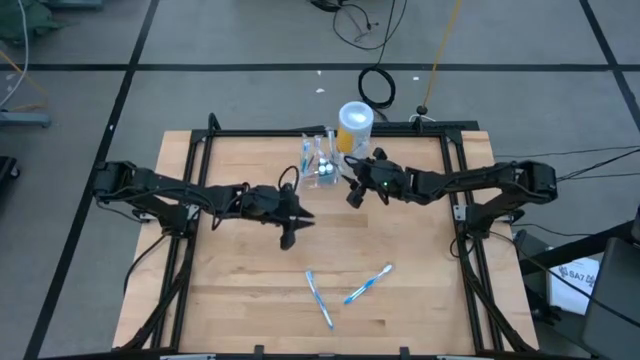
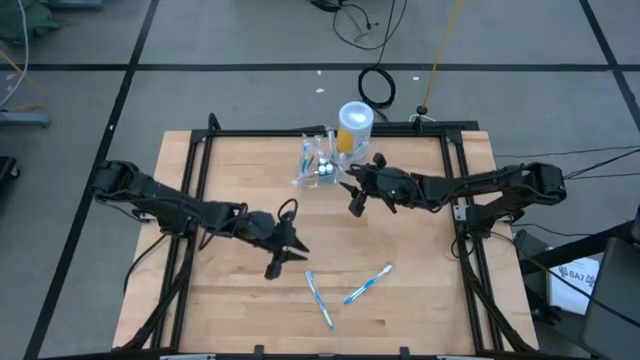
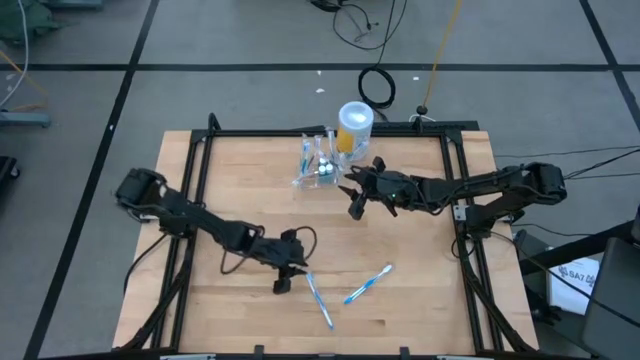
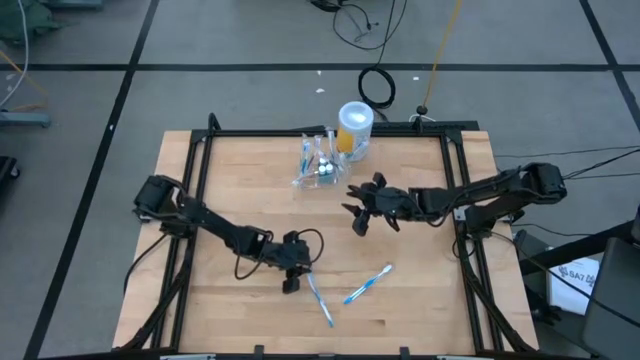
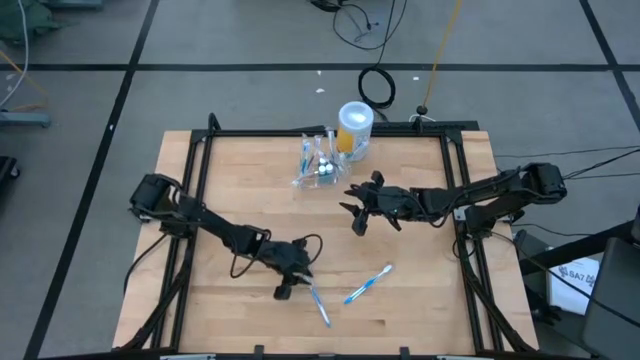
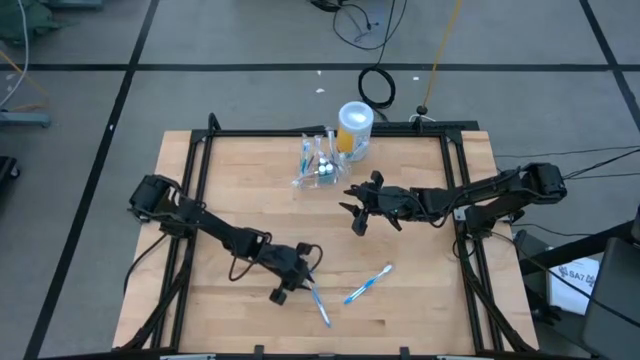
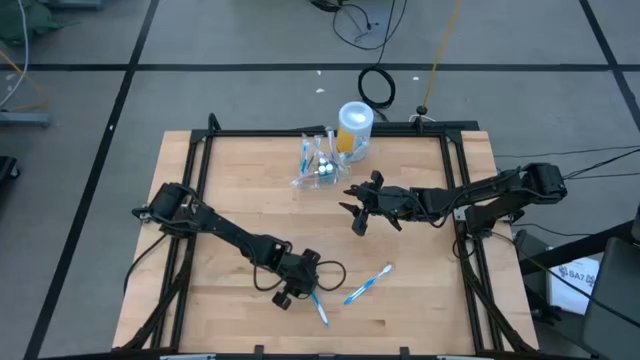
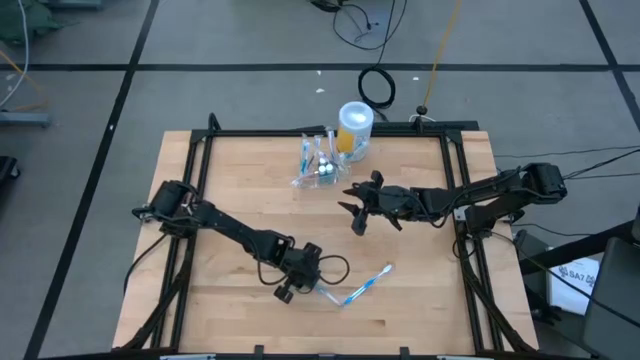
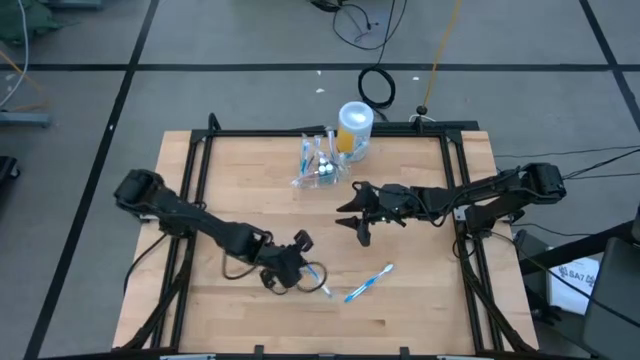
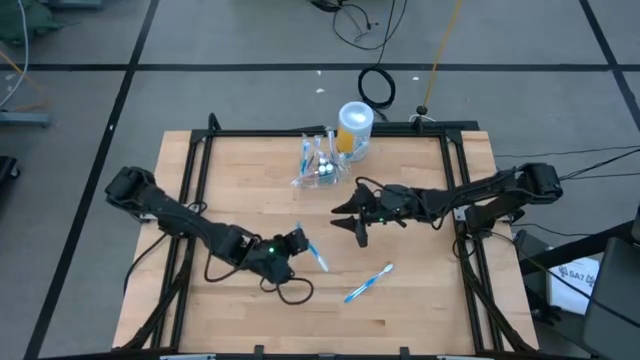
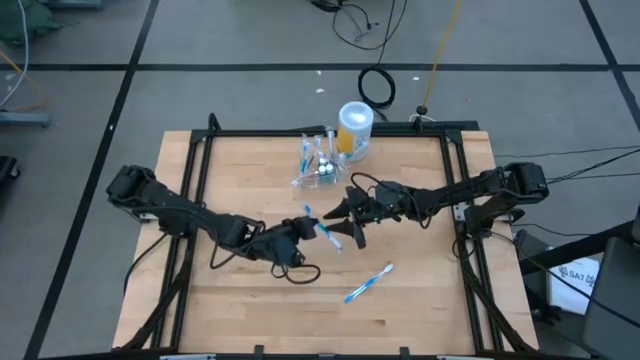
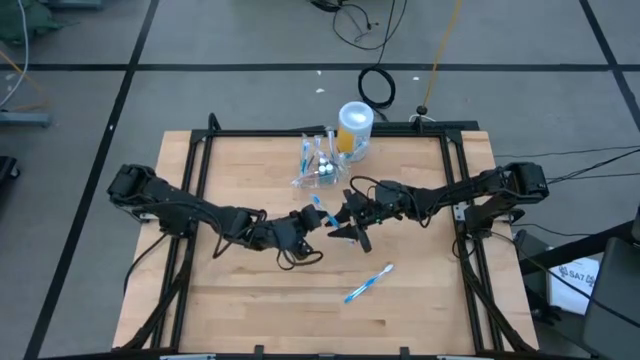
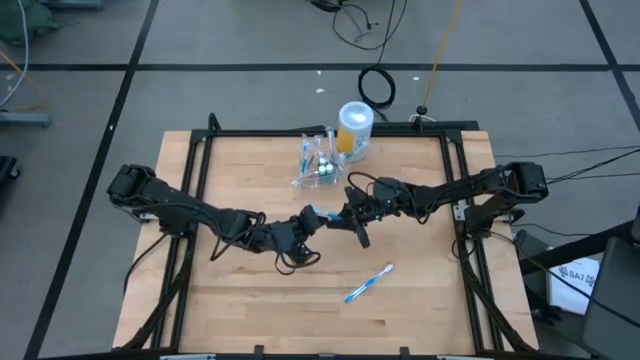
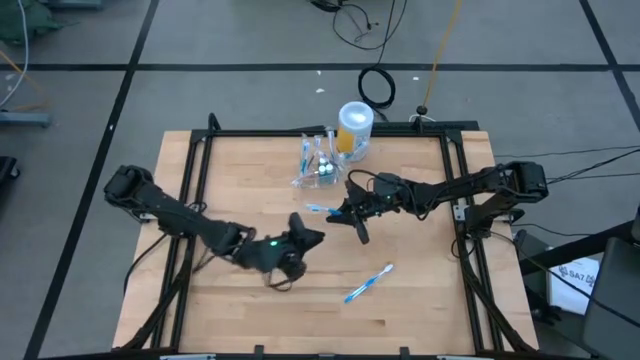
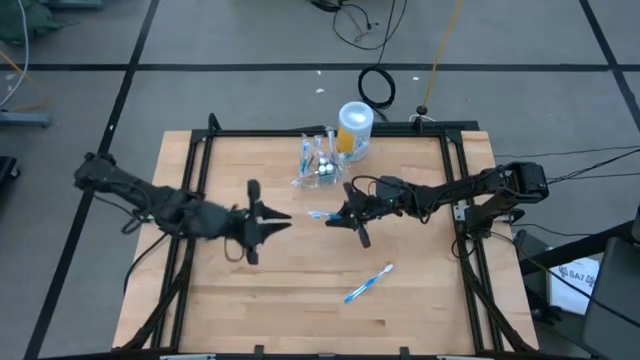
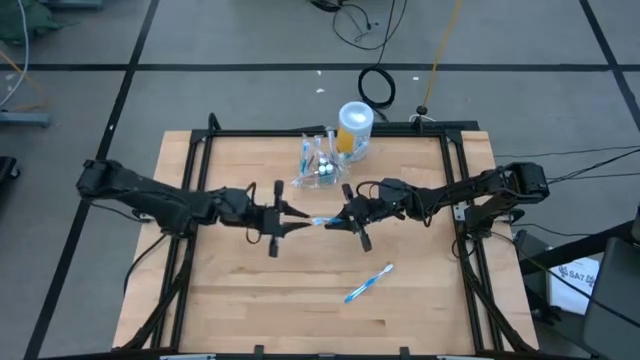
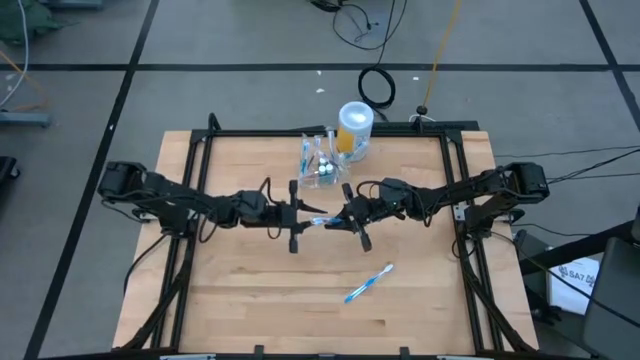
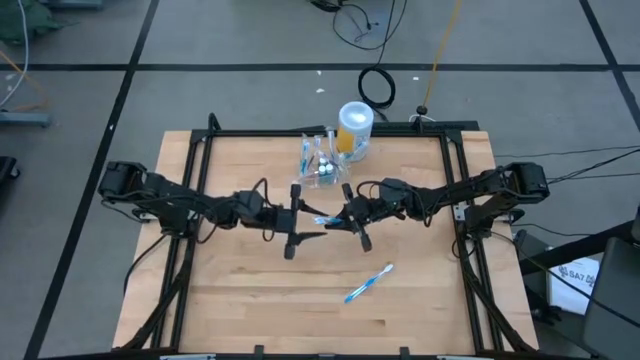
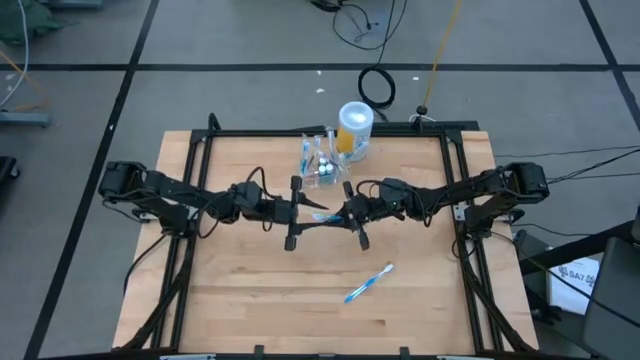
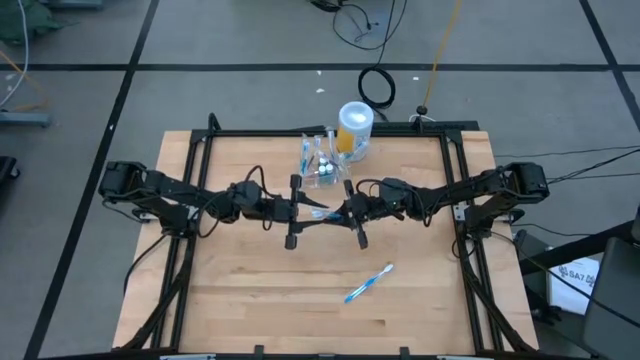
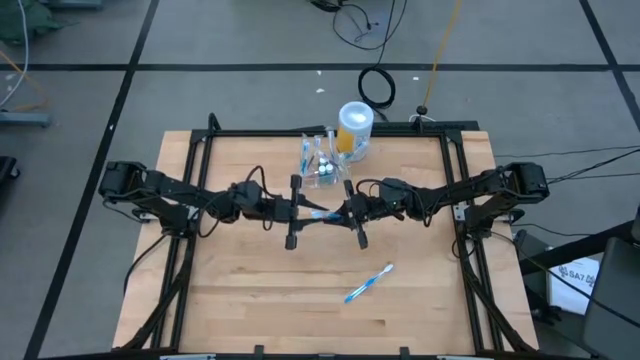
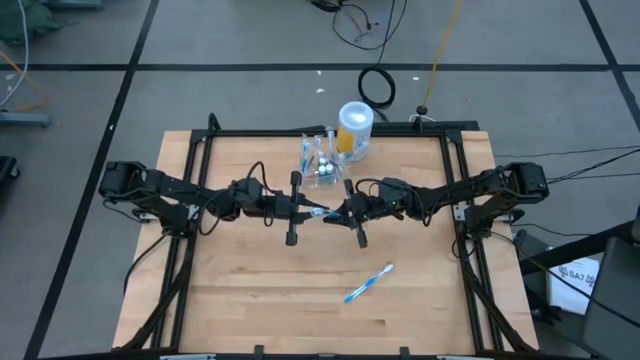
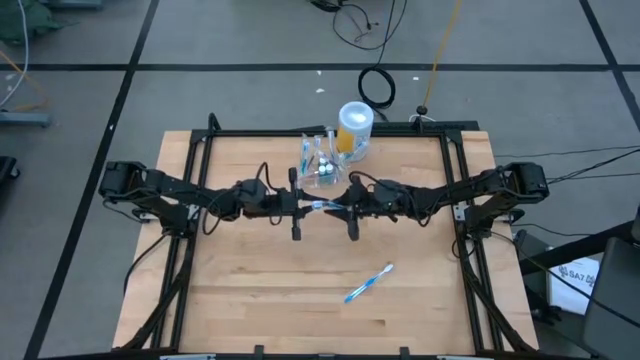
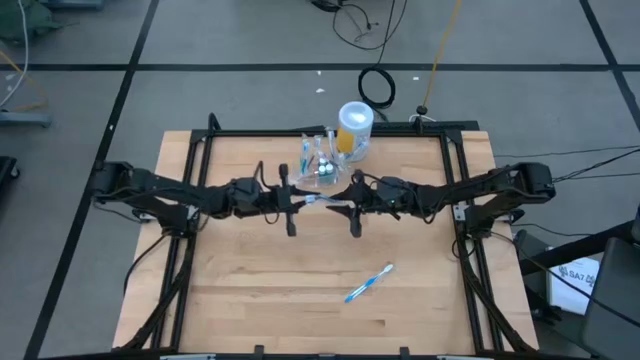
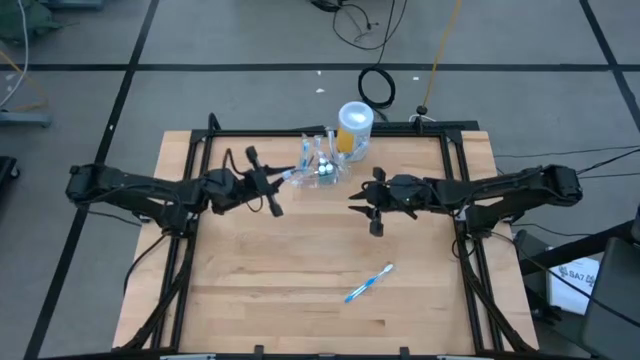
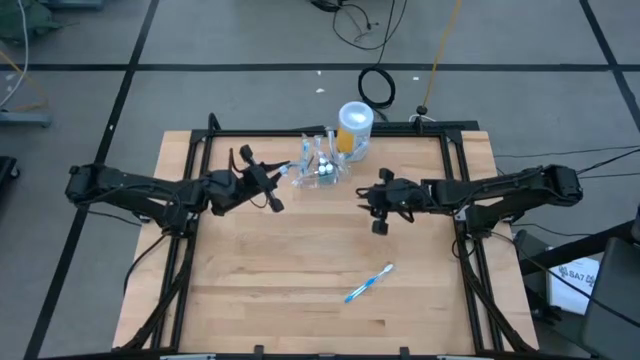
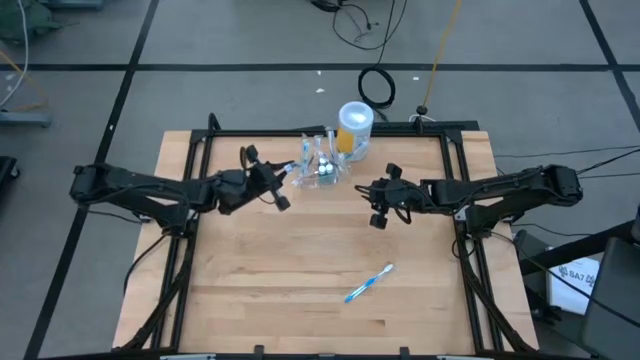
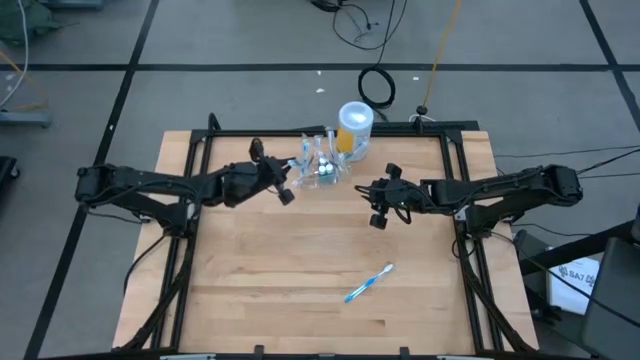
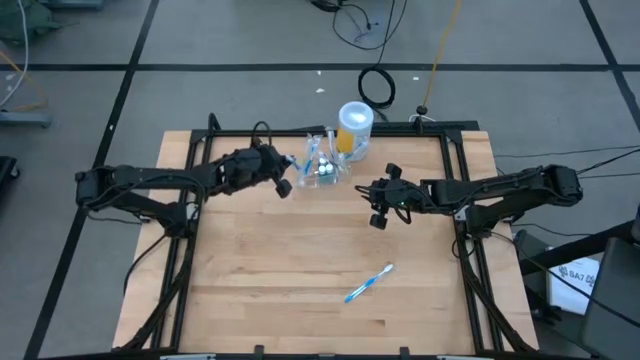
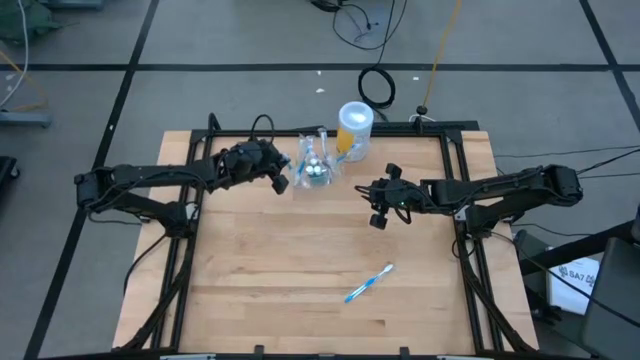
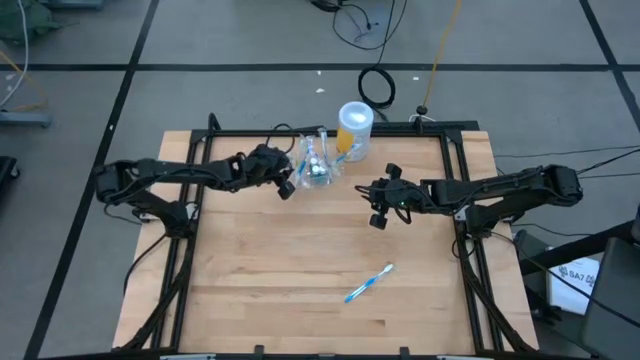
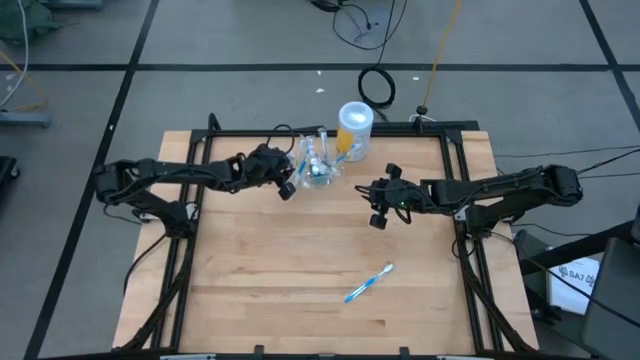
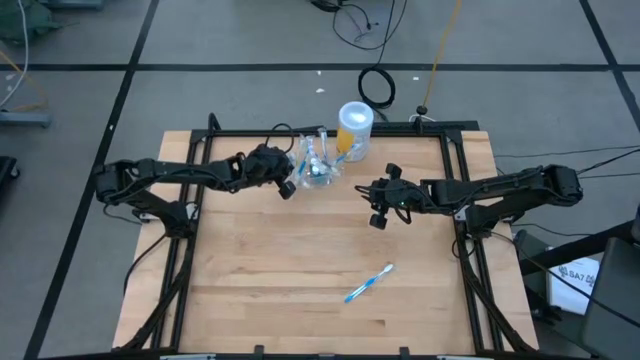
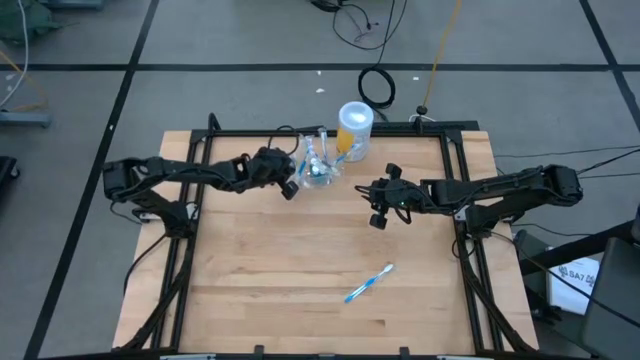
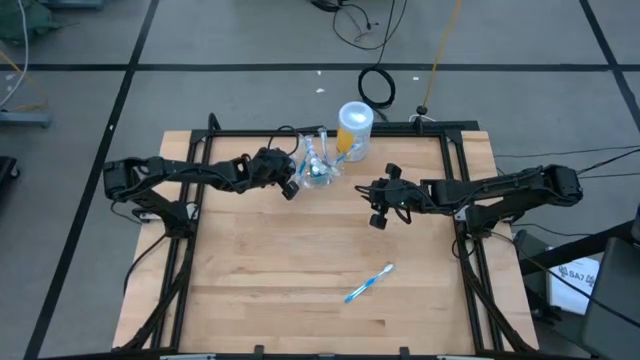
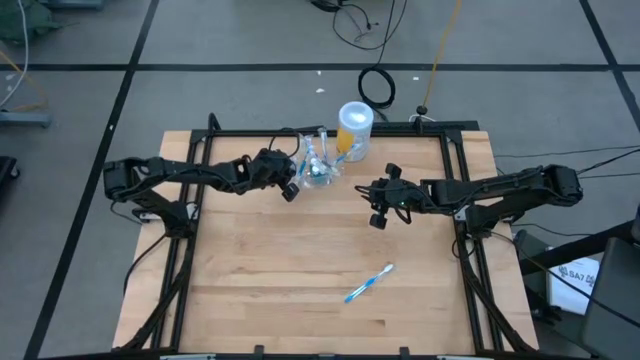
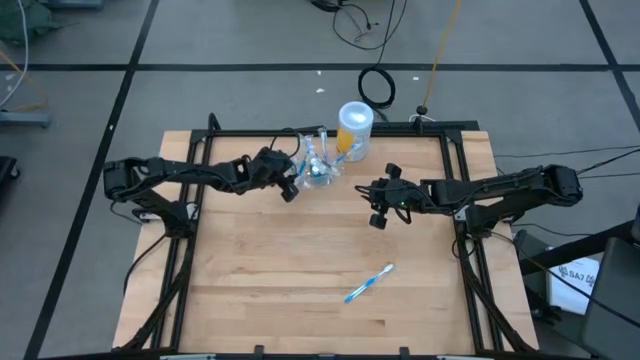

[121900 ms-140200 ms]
Task: Pick & Place toothbrushing station
Put the left blue toothbrush into the left section of the transparent organizer

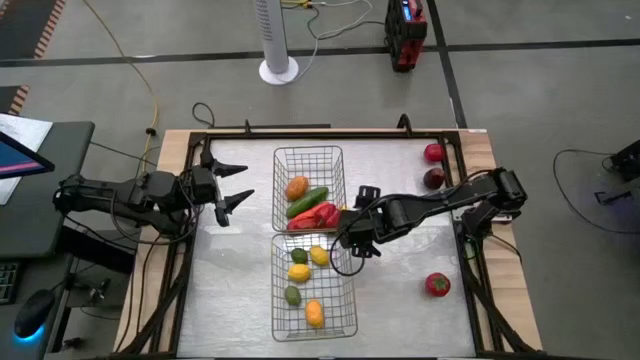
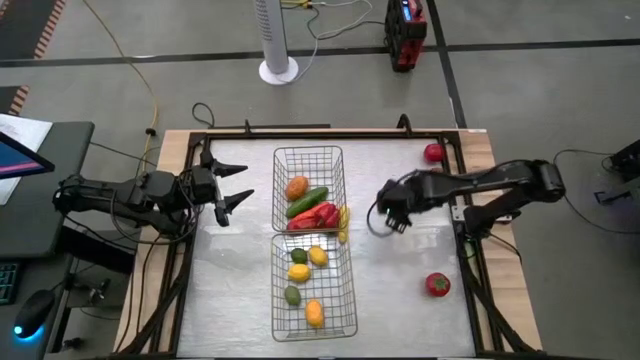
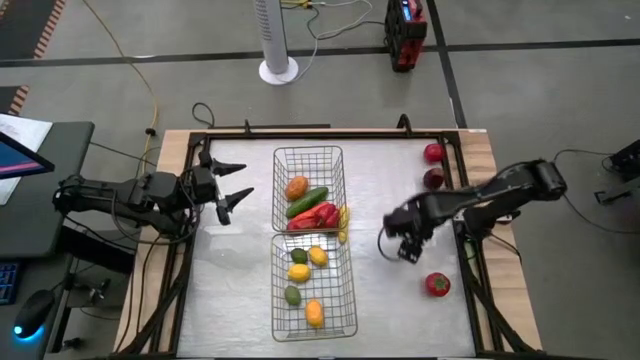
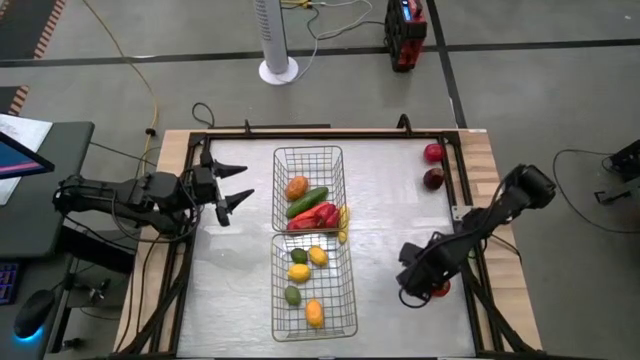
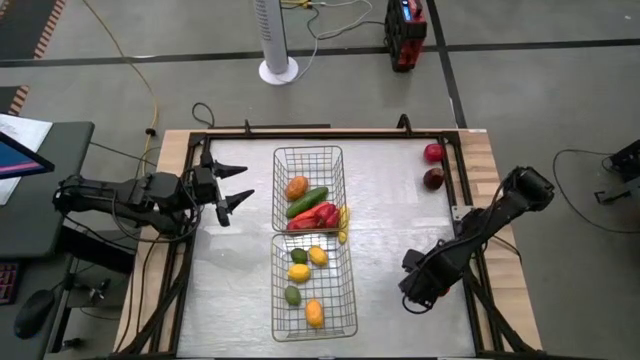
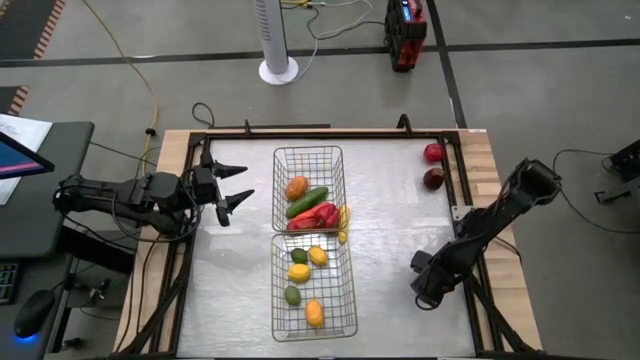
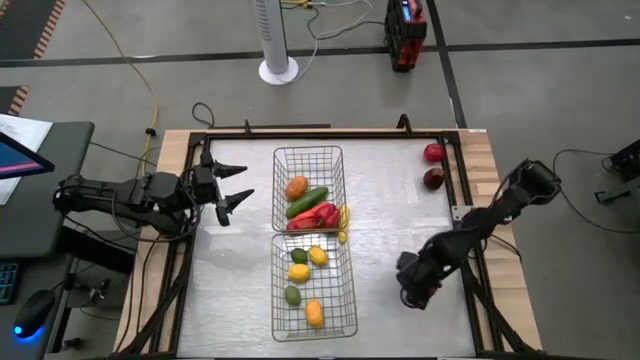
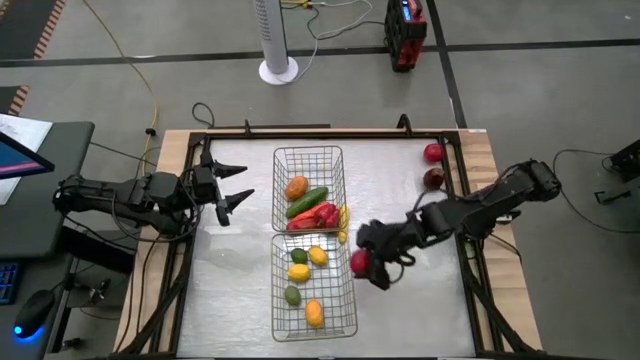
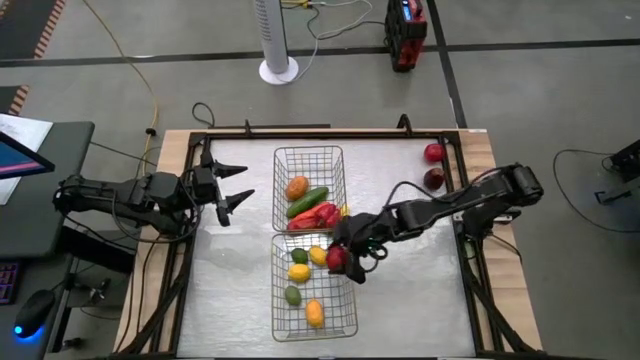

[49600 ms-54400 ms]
Task: Sort produce into baskets
Put the tomato into the bottom wire basket
